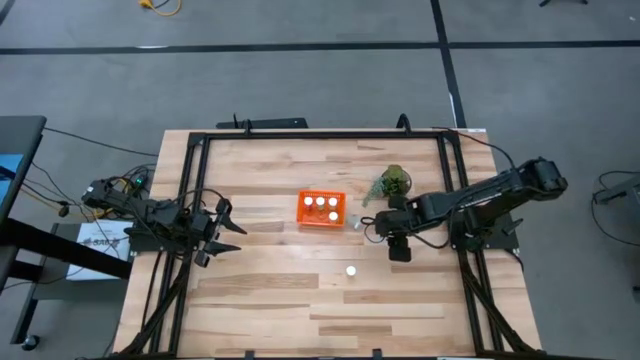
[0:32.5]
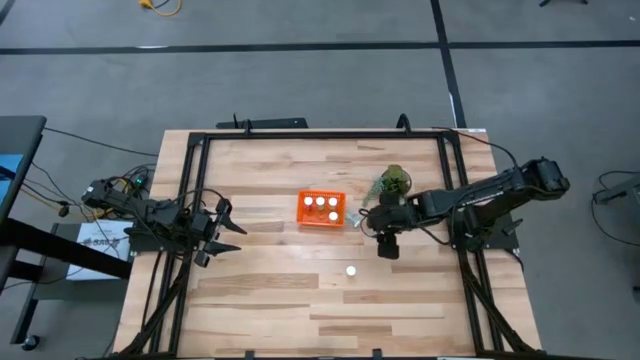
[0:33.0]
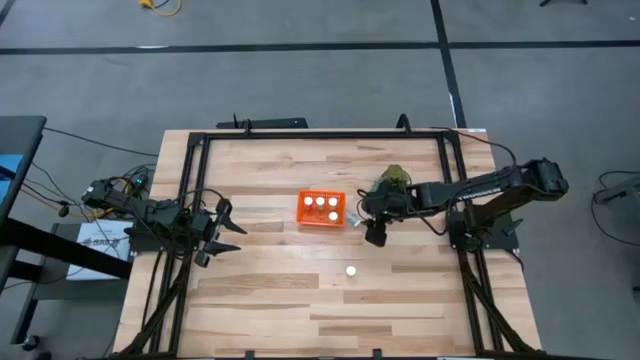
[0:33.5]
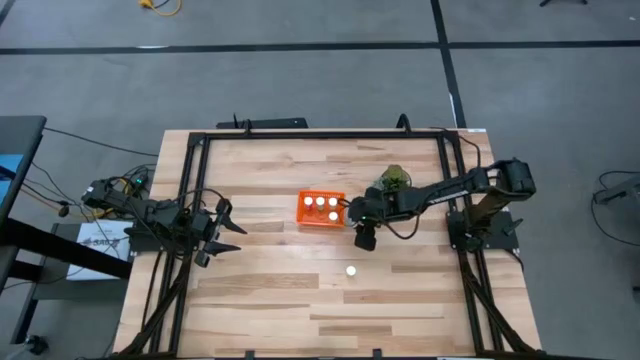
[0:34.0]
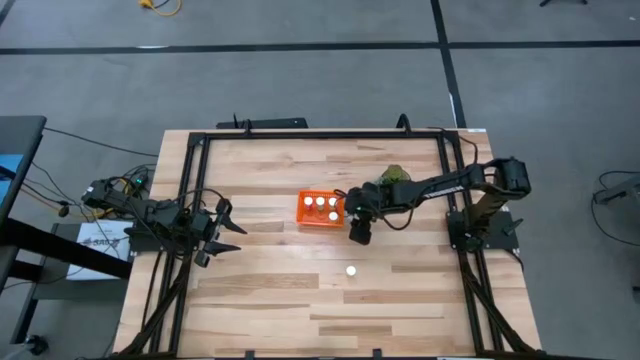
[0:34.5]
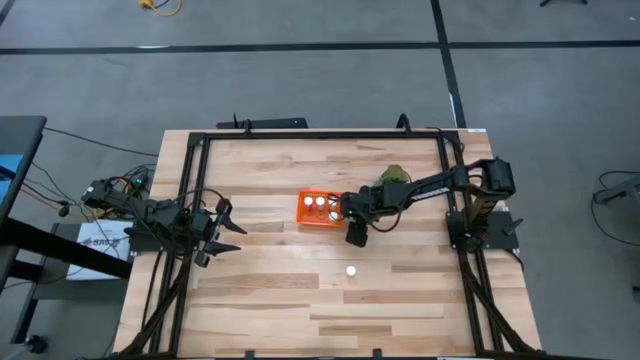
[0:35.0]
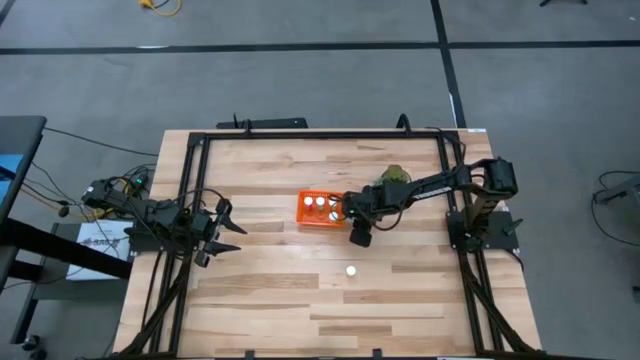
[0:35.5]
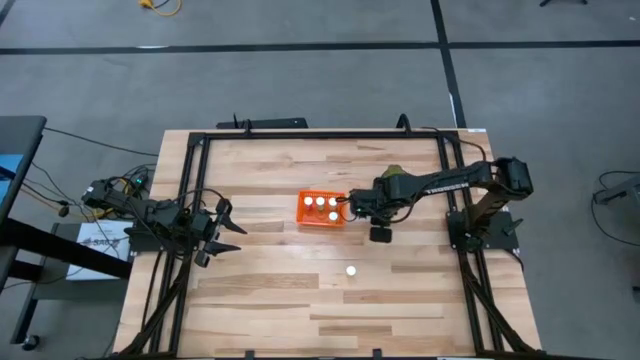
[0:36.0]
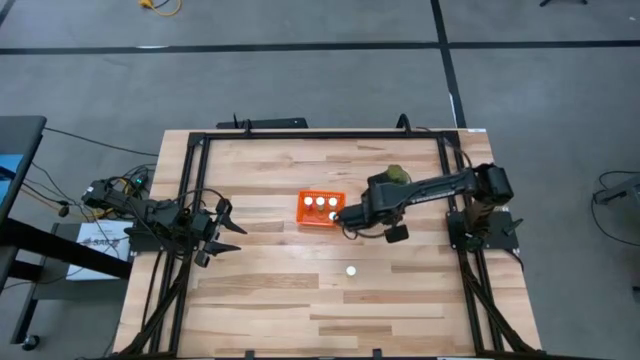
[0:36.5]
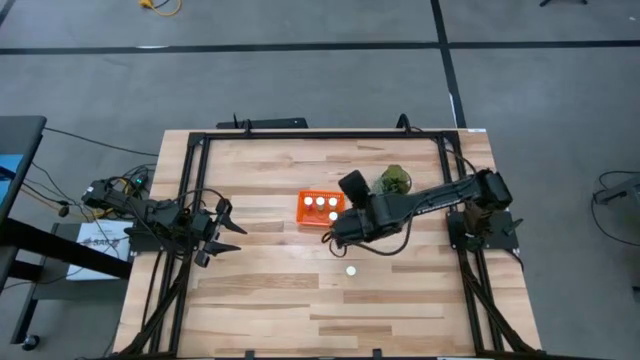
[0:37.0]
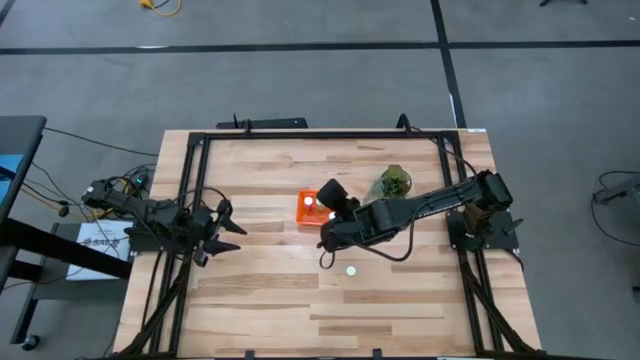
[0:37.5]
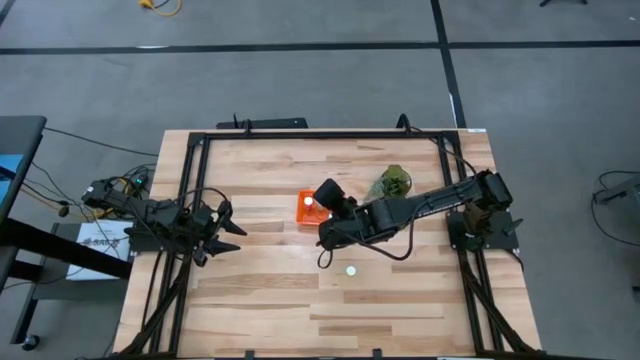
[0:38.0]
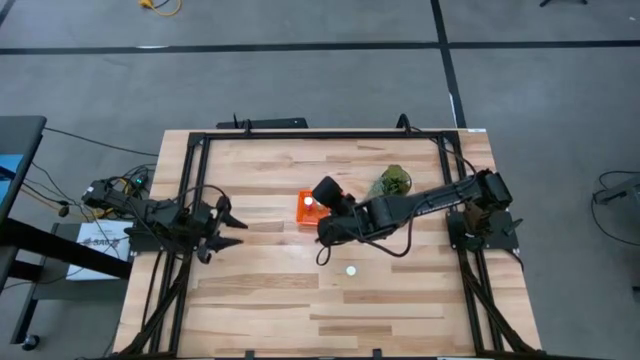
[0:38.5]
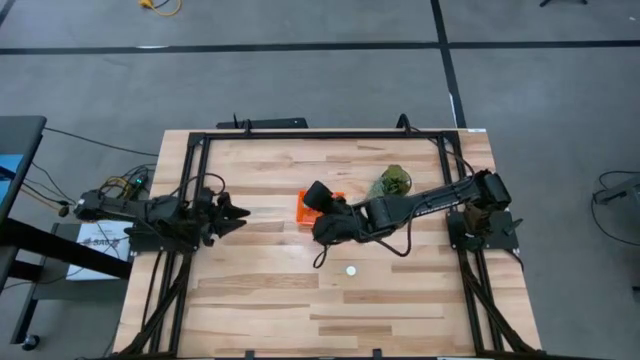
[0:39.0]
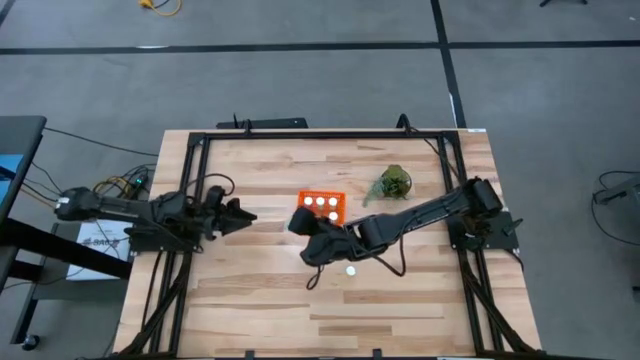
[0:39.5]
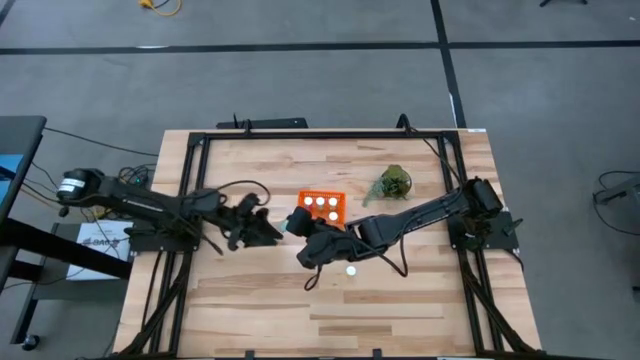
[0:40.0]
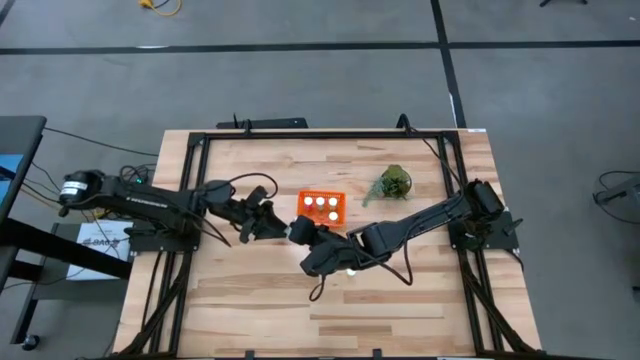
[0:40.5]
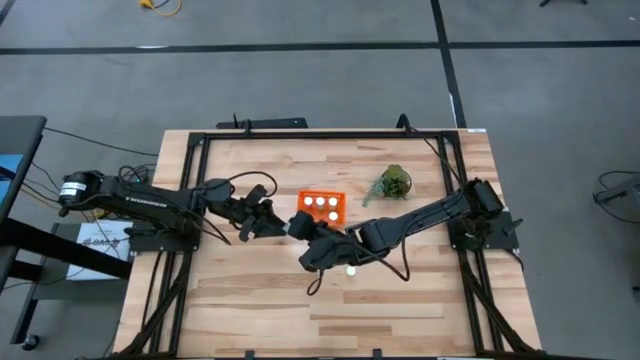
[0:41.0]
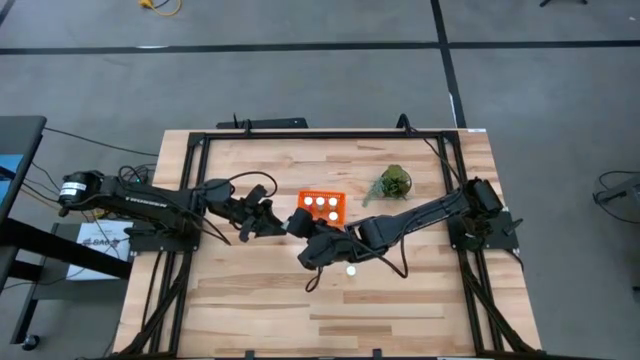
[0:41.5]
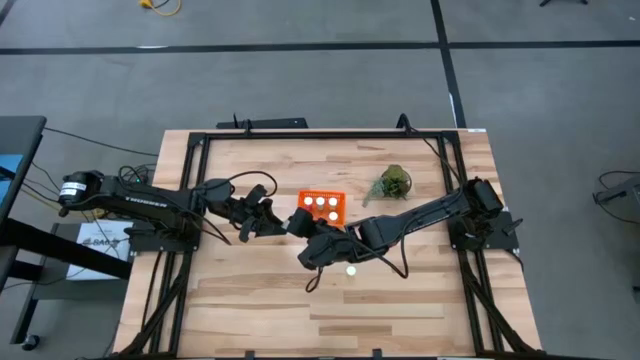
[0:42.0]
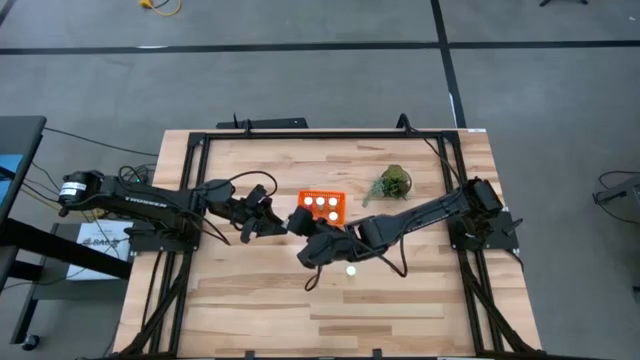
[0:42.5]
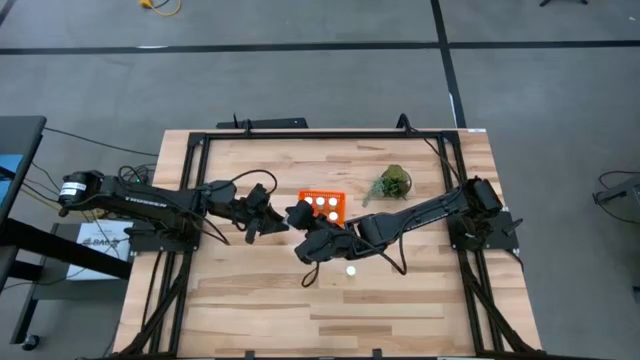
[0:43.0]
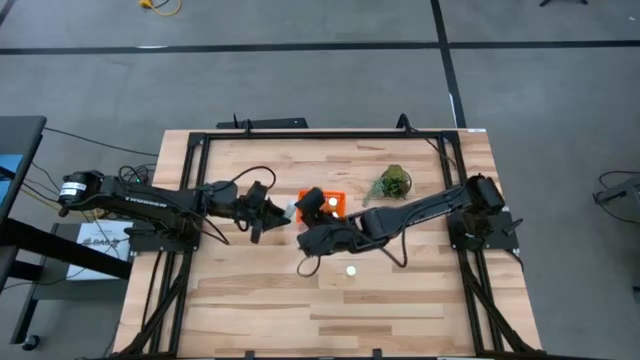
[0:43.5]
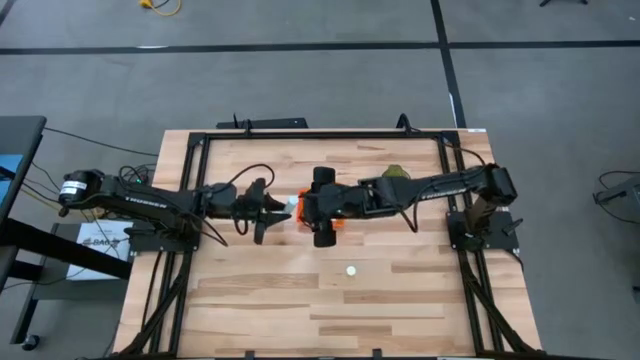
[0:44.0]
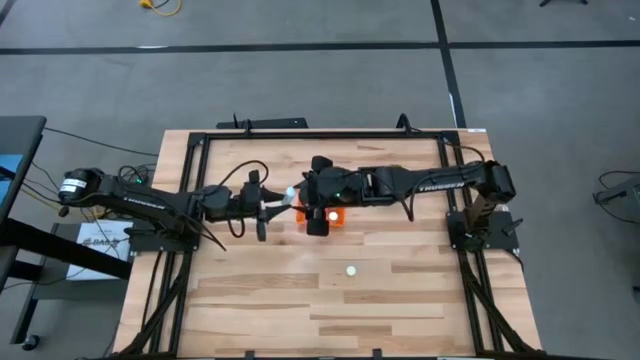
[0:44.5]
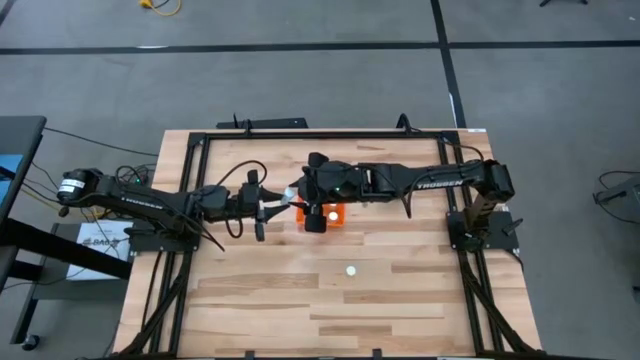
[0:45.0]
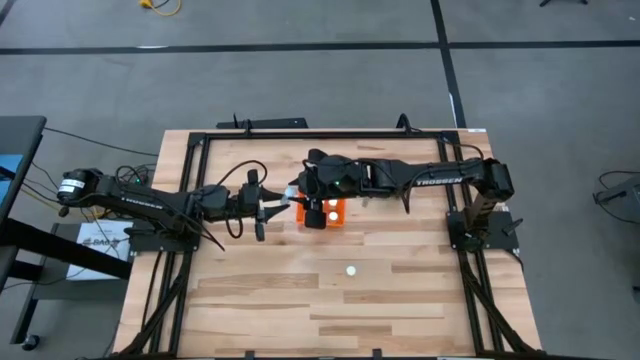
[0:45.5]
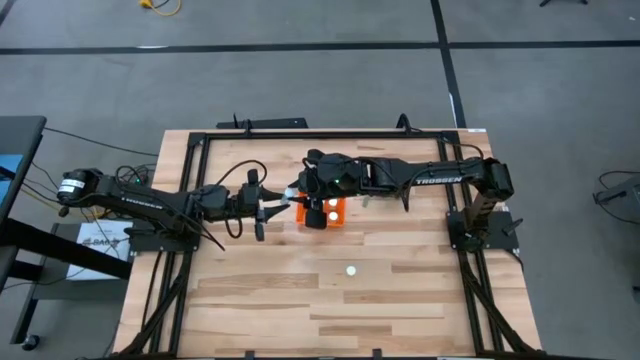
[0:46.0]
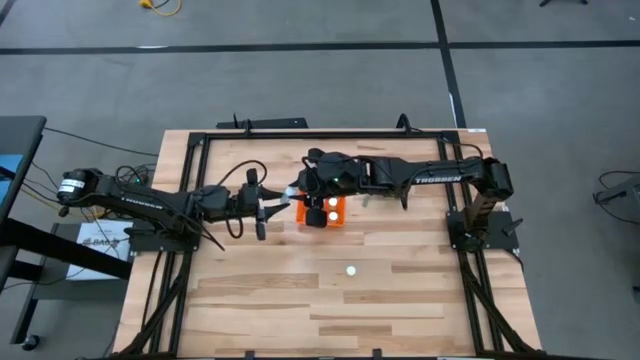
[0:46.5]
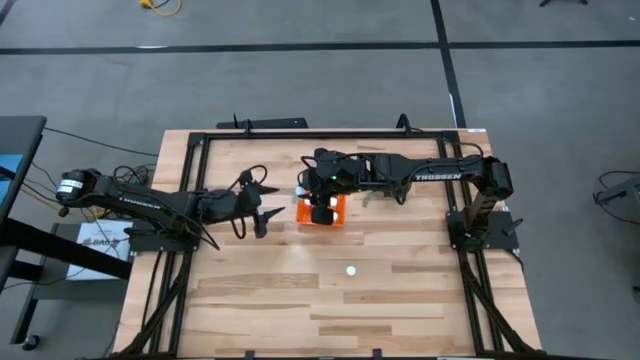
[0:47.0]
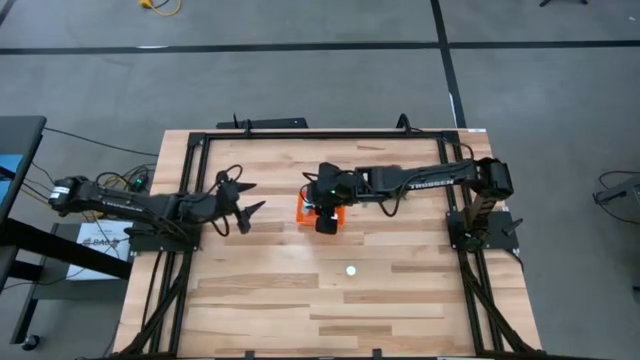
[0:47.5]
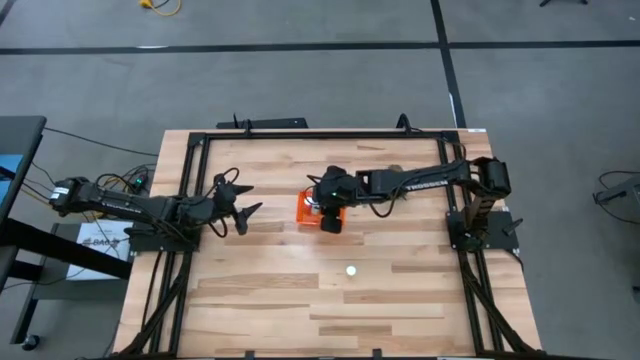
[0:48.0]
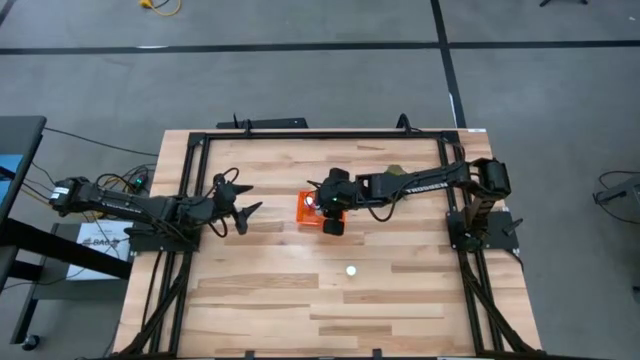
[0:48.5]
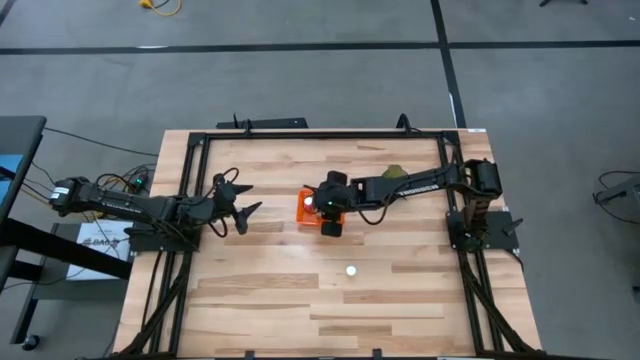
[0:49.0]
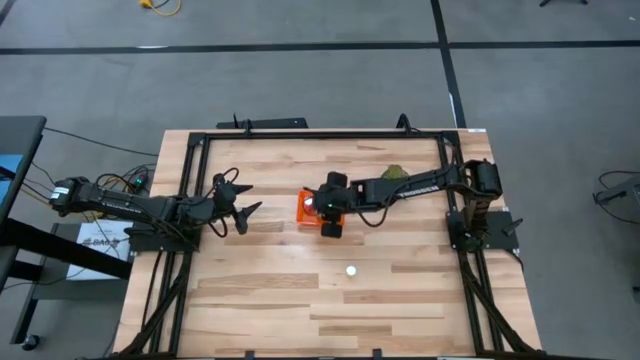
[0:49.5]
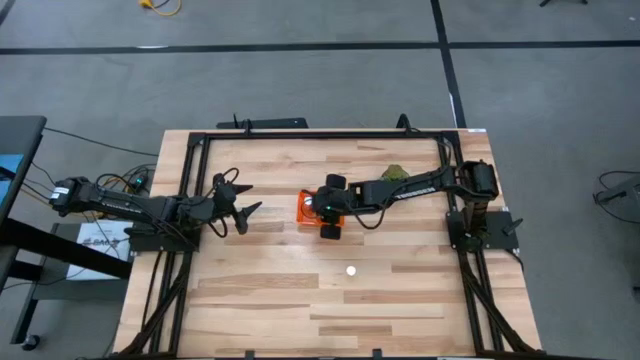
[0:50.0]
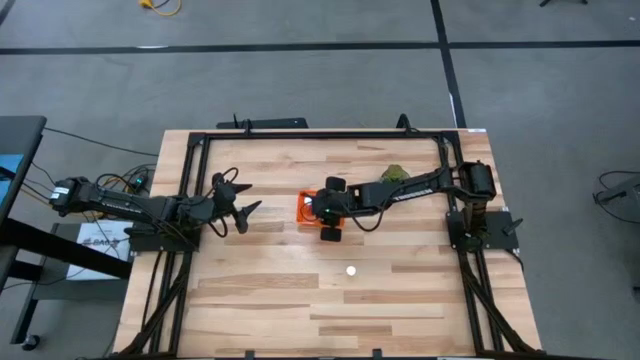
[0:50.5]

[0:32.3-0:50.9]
Task: Pick and place pill bottles into a basket
Put the blue pill bottle into the orange bin

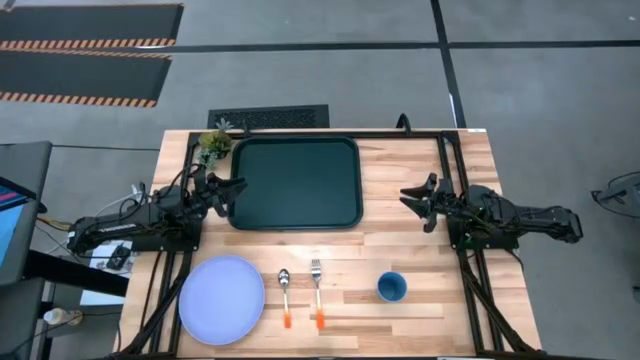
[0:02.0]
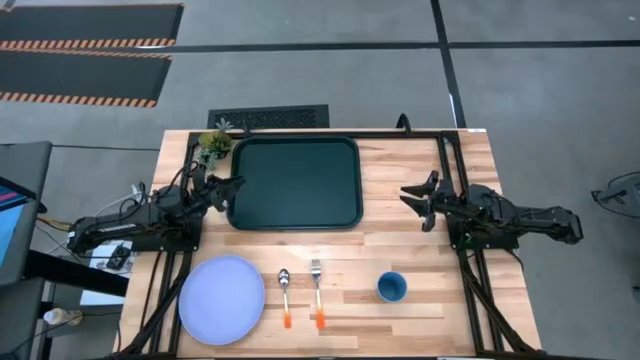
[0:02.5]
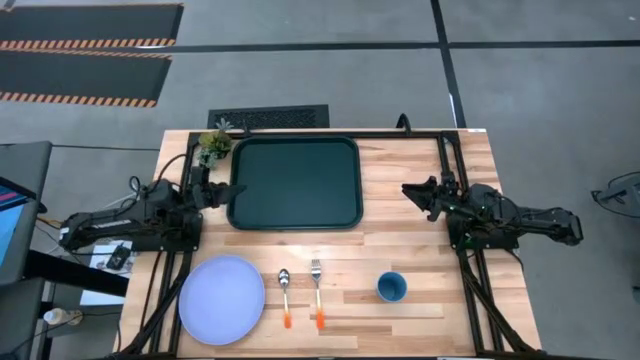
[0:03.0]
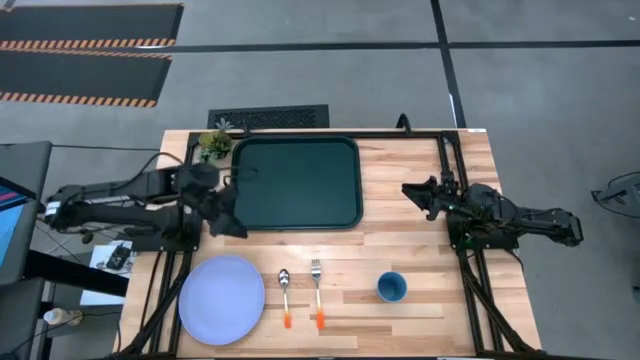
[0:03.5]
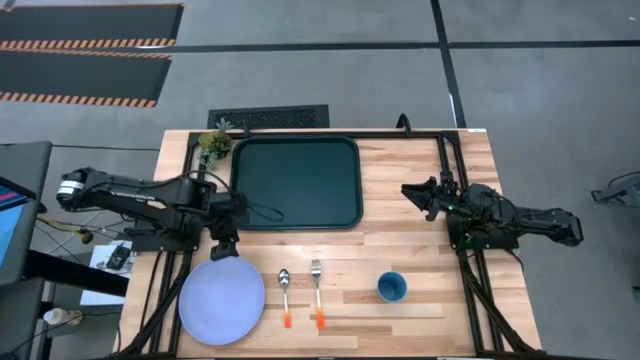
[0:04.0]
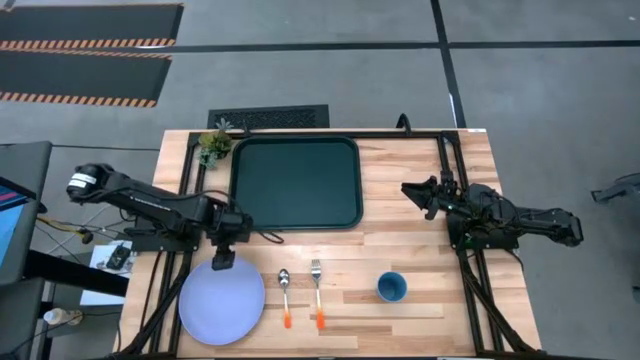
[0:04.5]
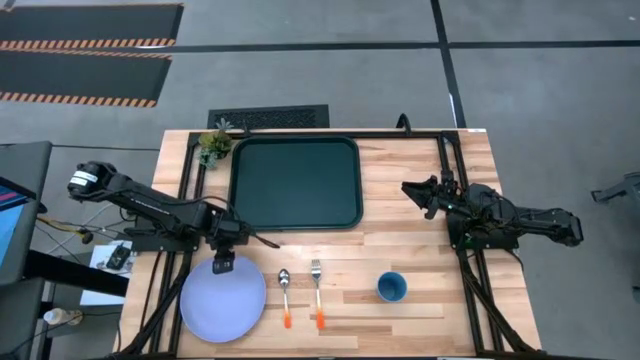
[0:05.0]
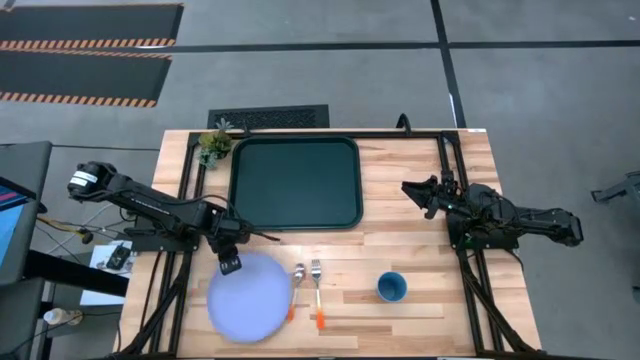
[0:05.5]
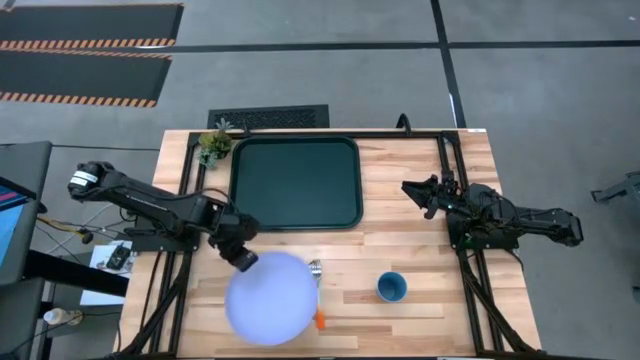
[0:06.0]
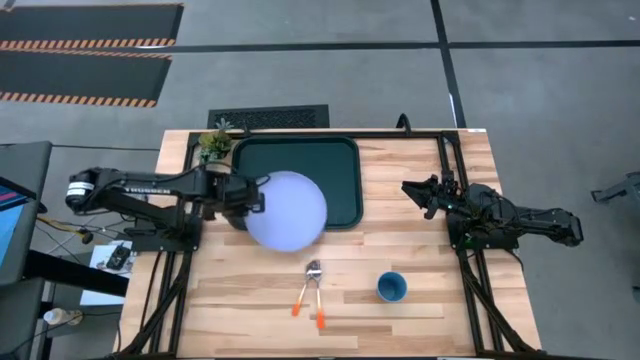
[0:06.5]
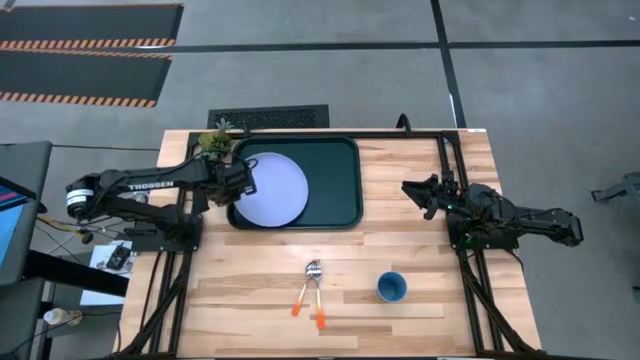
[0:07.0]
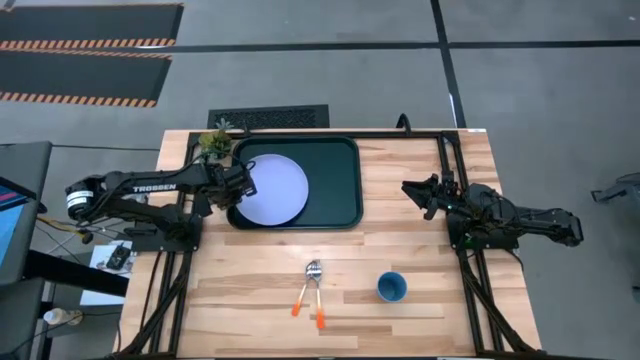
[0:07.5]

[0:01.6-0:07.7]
Task: Pick and place plate/cup/fork/spoon on tray
Put the light blue plate on the dark green tray
